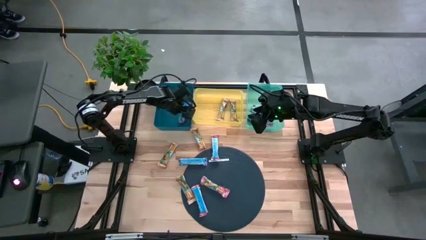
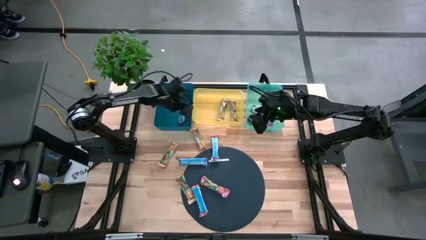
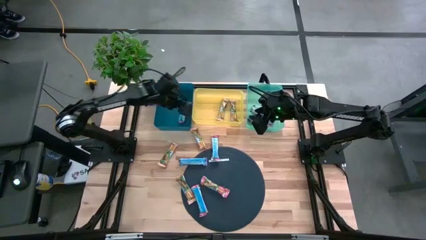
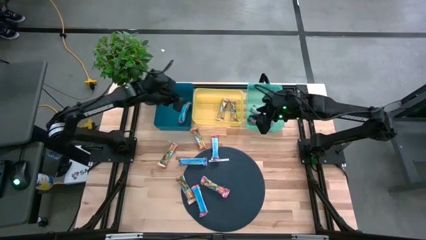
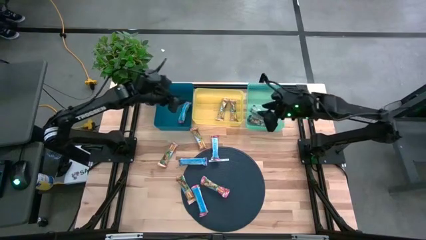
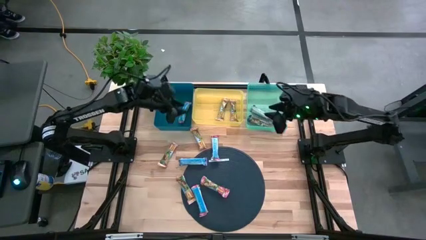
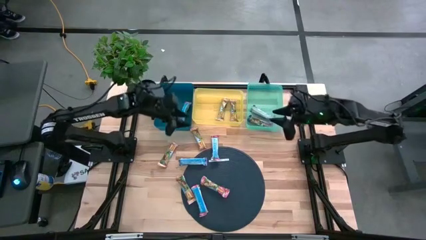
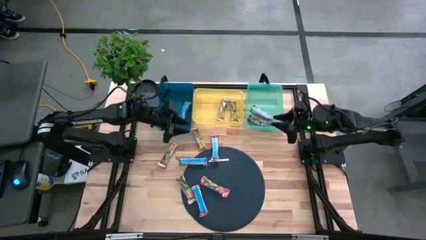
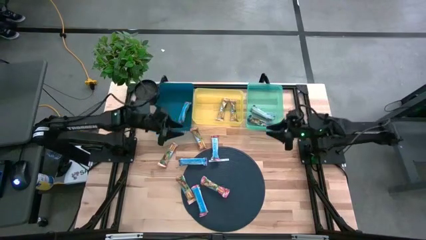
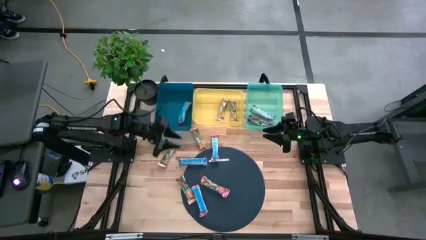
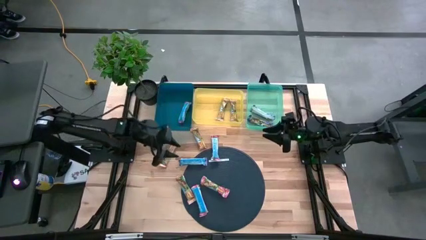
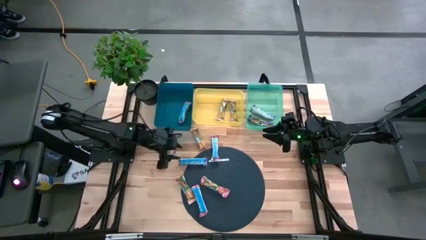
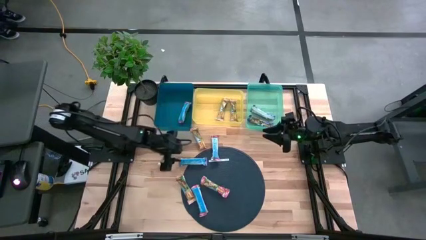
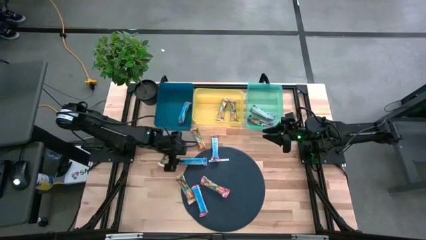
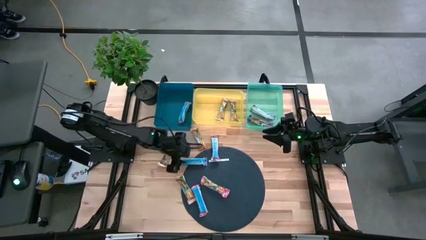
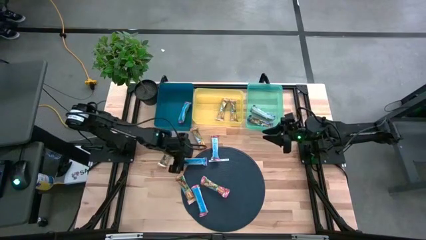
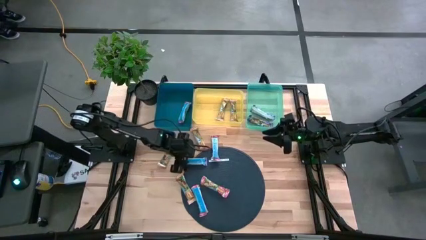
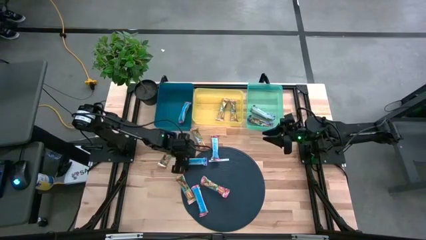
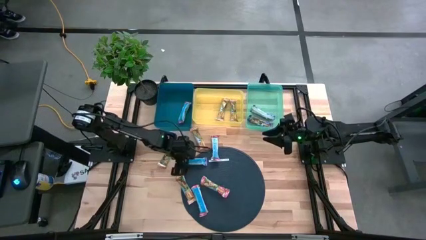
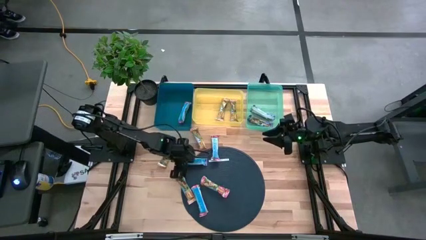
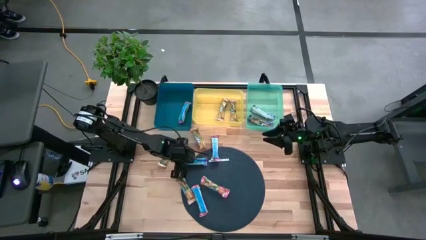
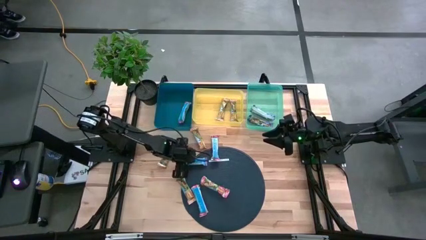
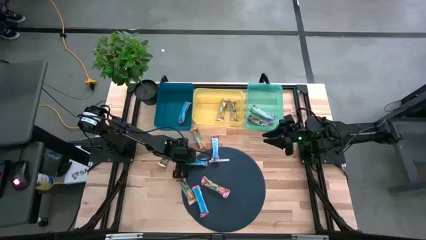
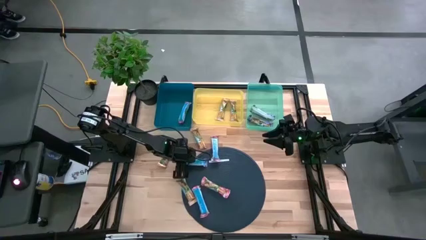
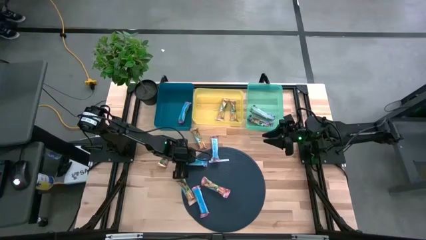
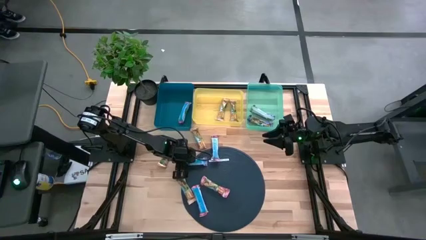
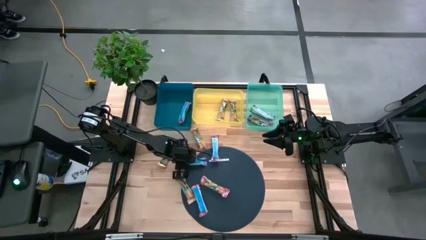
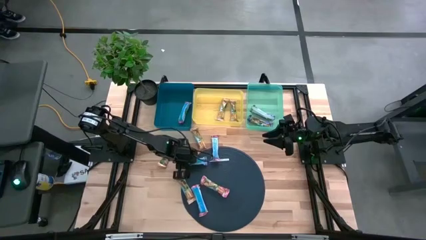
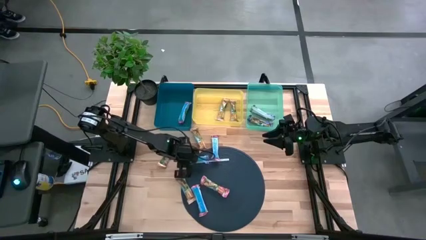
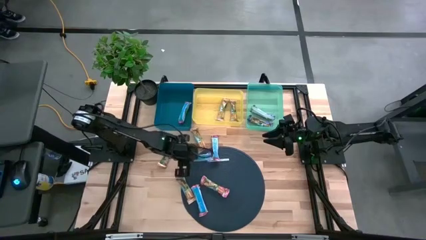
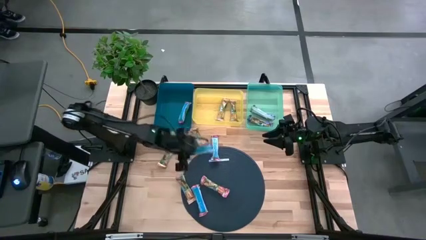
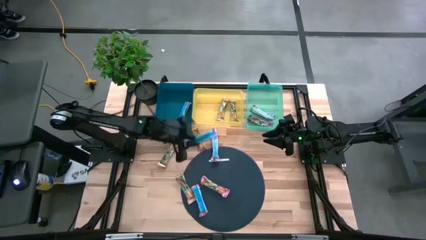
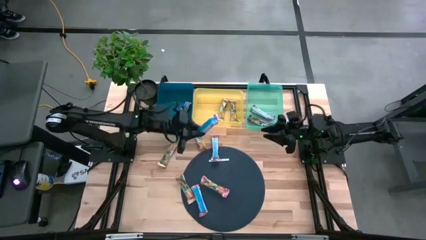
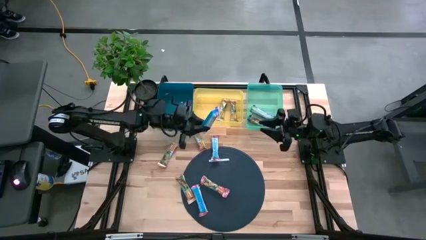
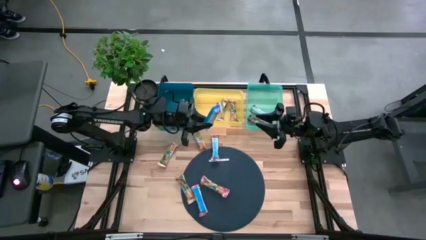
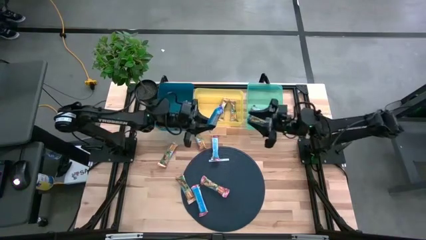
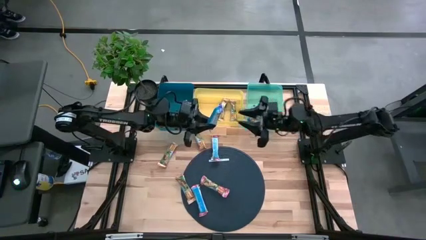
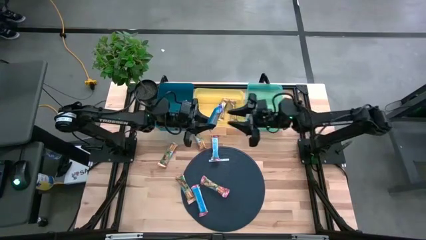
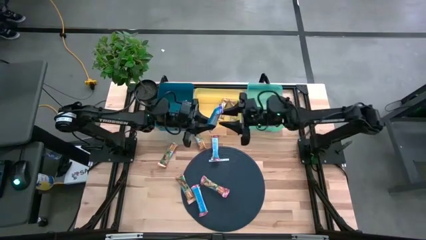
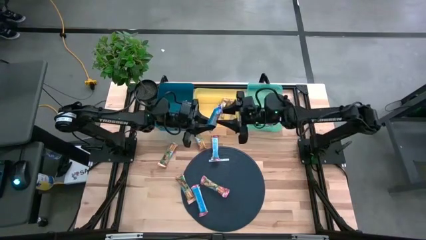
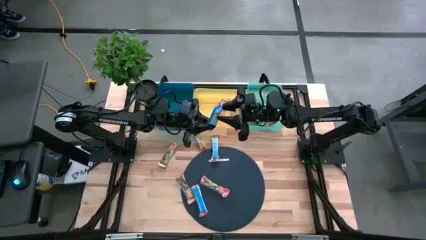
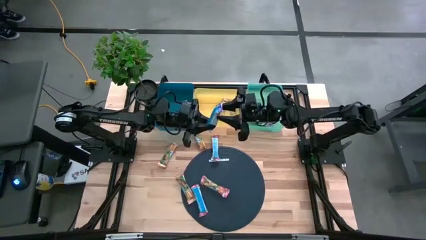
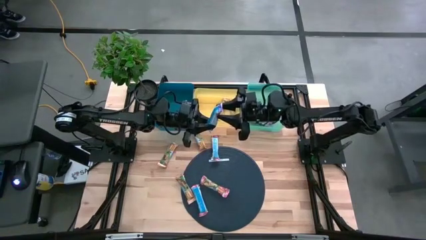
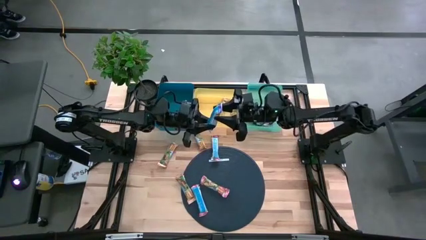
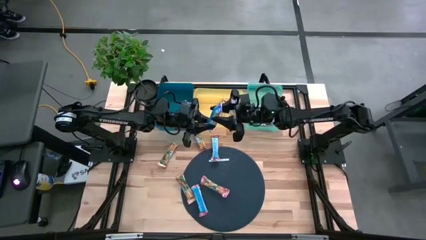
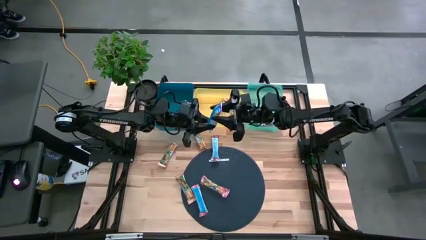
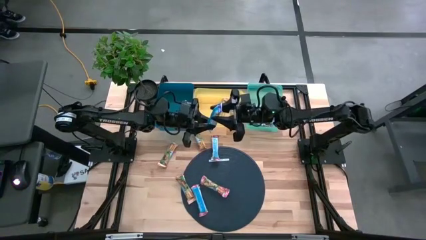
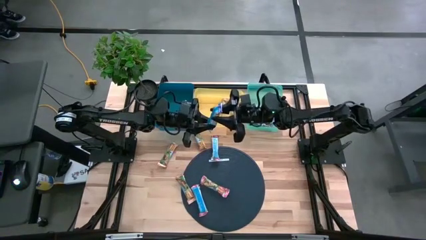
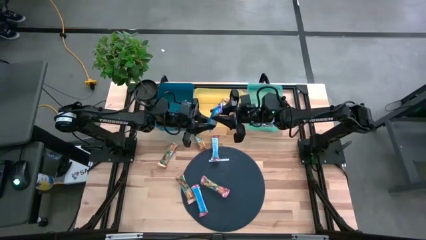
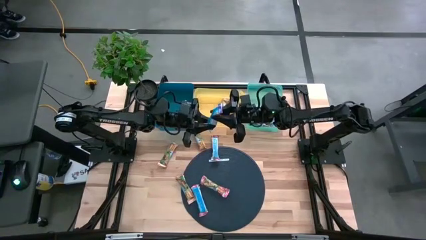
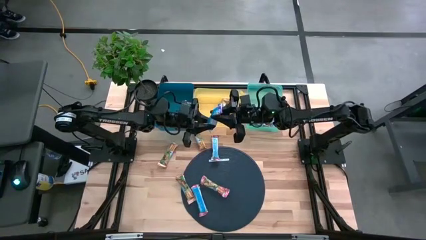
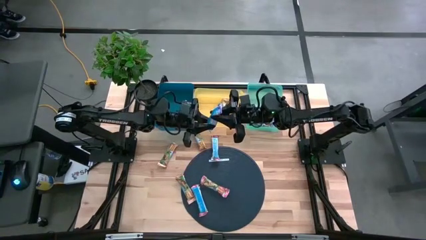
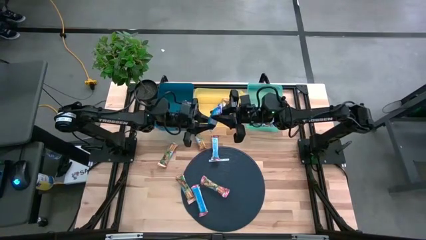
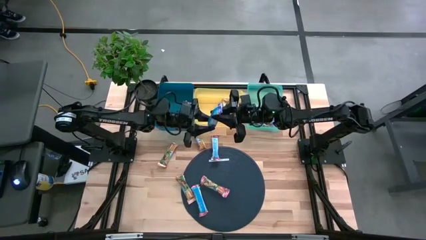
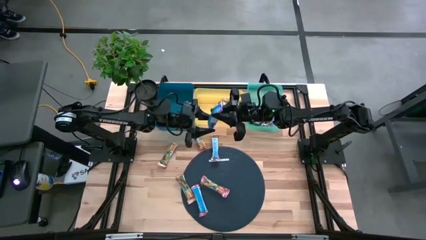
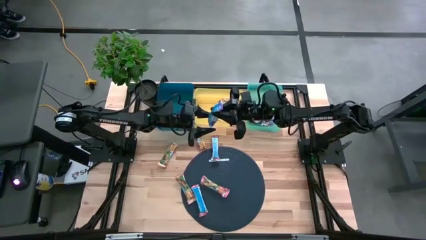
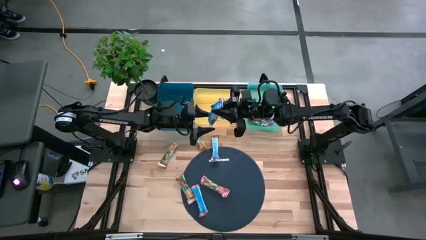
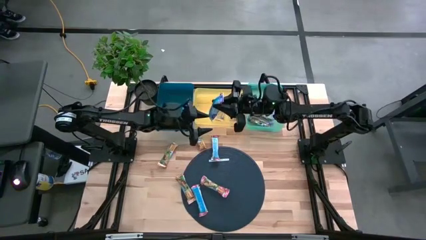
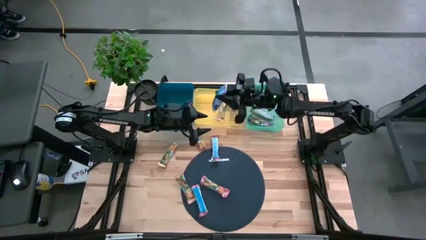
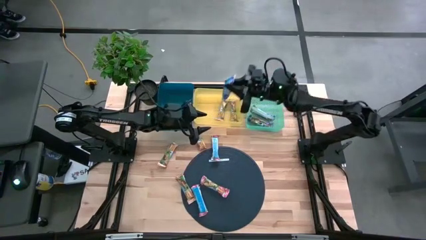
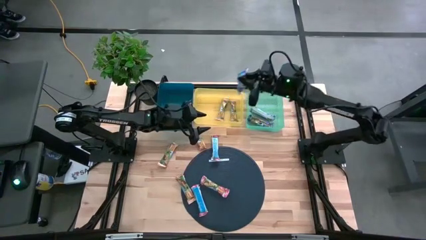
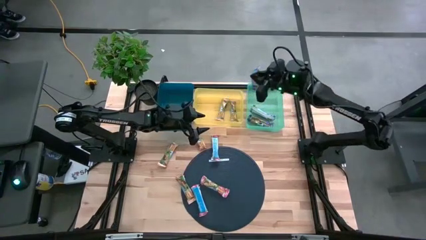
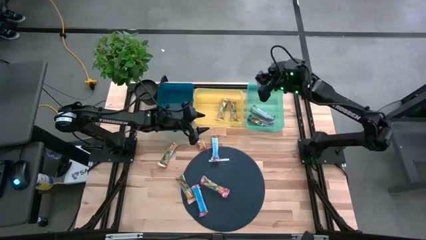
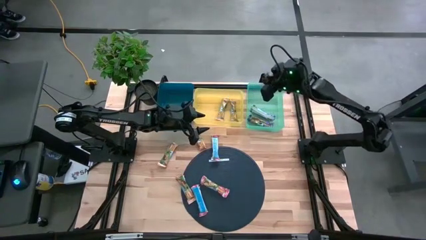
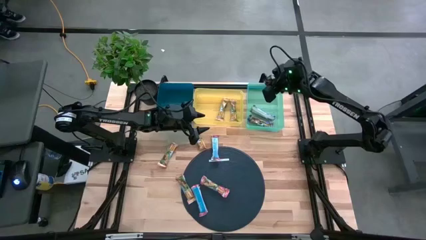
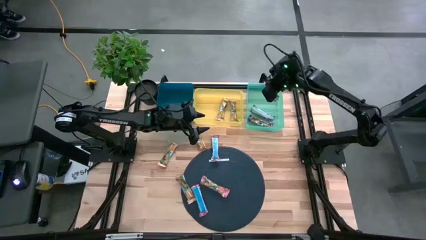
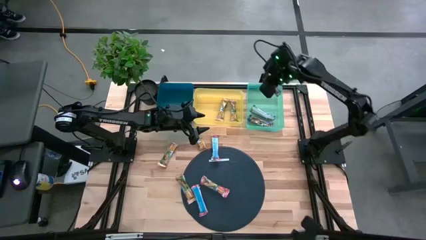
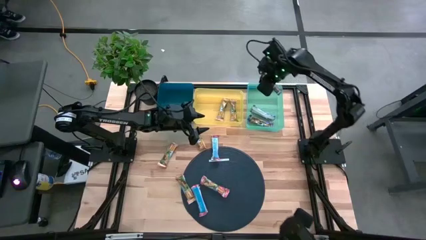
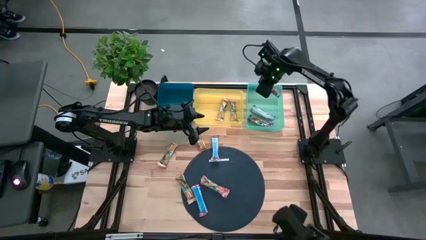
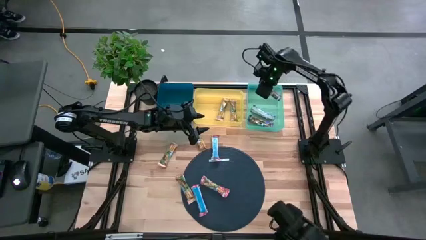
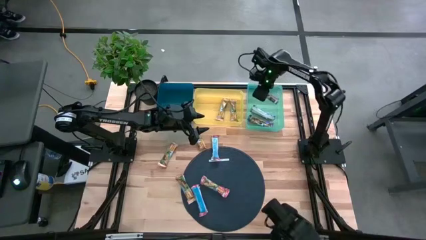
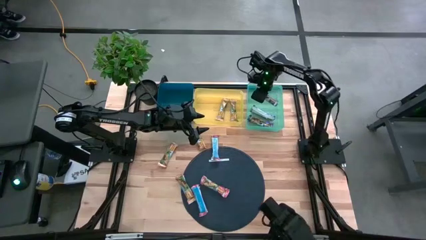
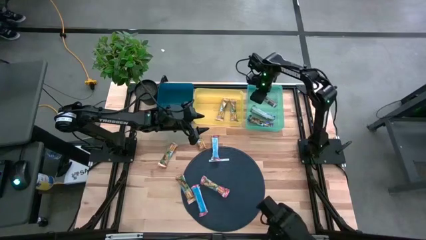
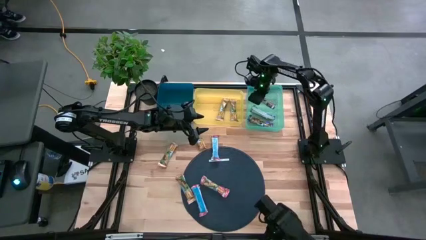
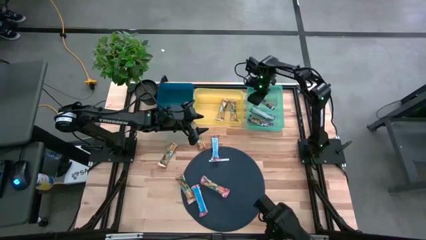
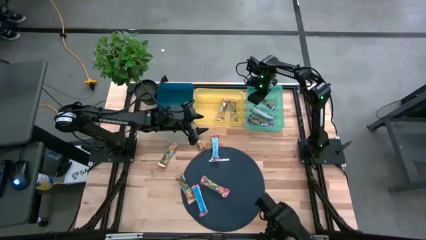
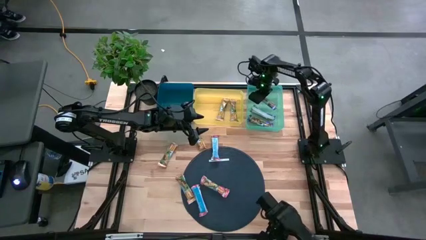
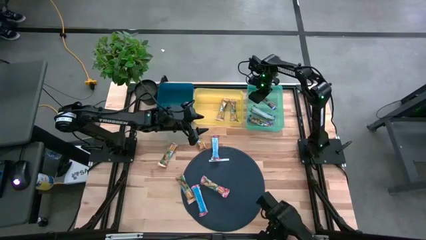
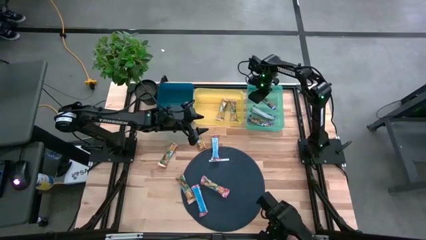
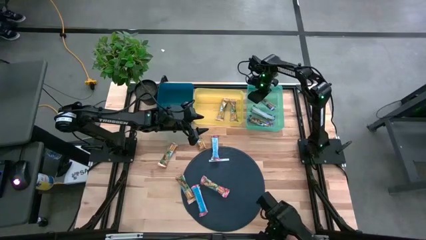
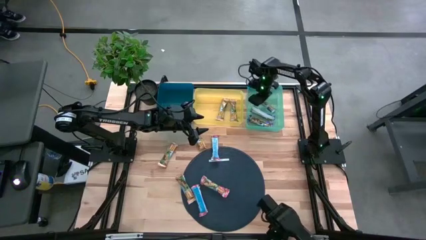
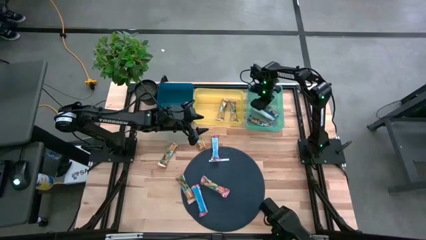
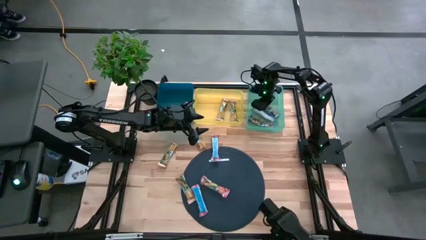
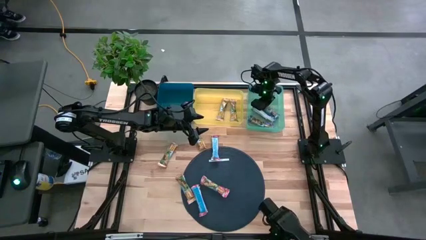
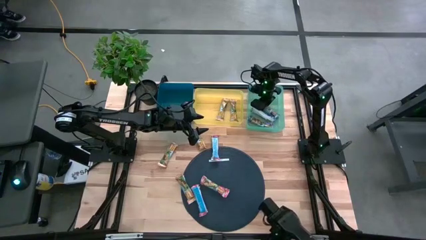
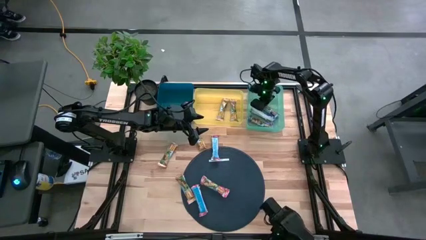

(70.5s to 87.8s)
Task: Pick and place Granola Bars by type
Put the violet granola bar into the green bin
